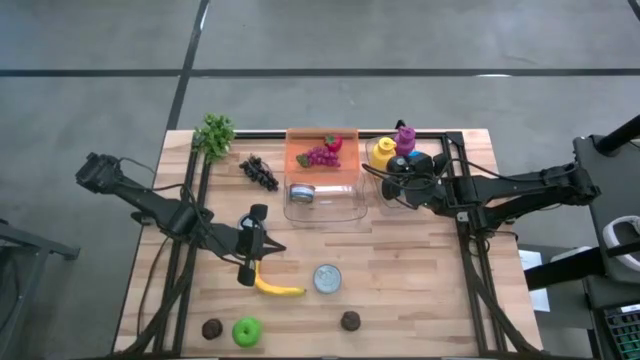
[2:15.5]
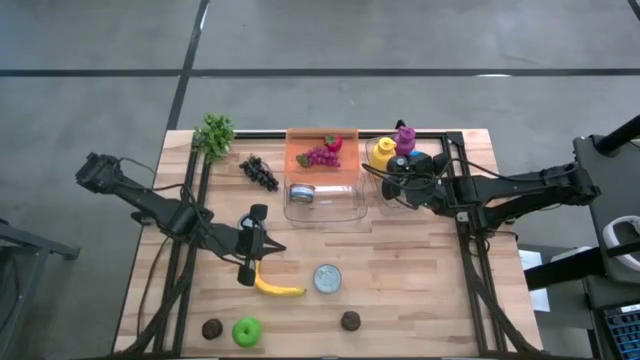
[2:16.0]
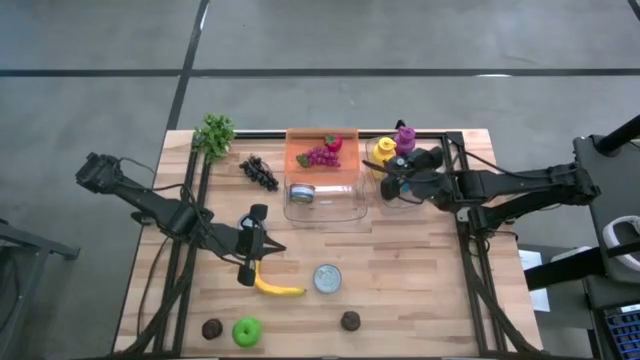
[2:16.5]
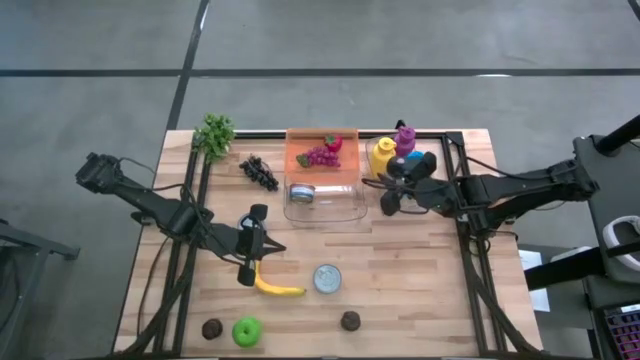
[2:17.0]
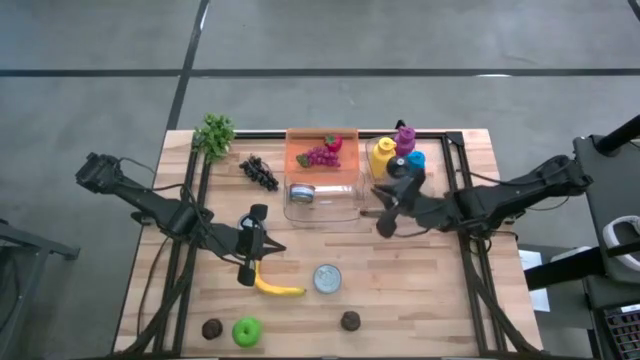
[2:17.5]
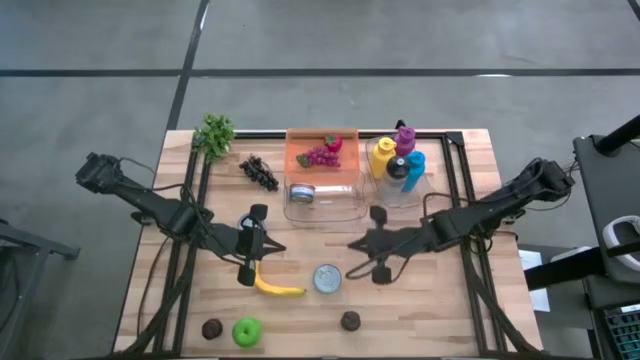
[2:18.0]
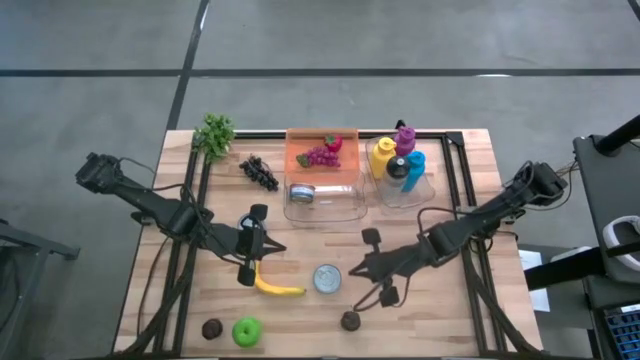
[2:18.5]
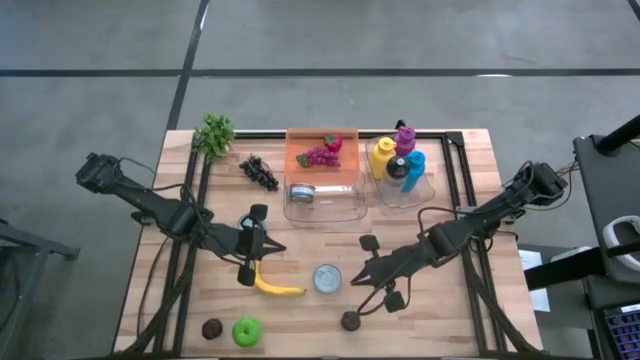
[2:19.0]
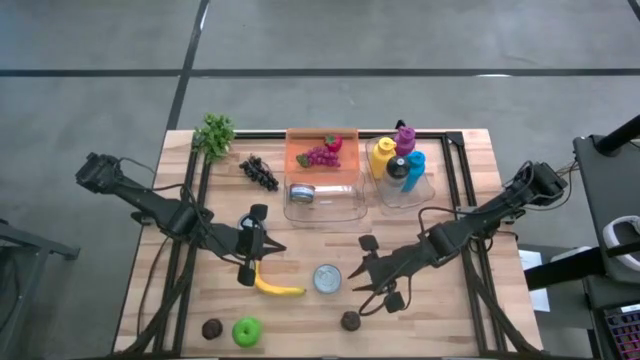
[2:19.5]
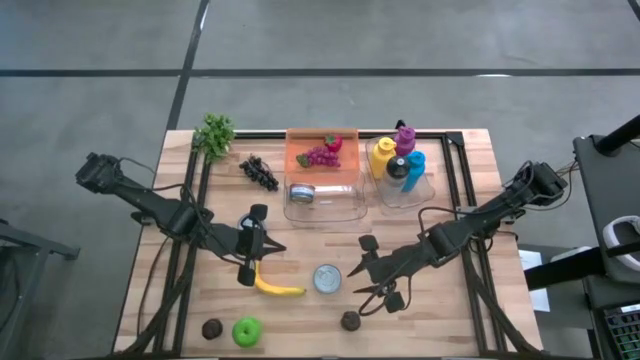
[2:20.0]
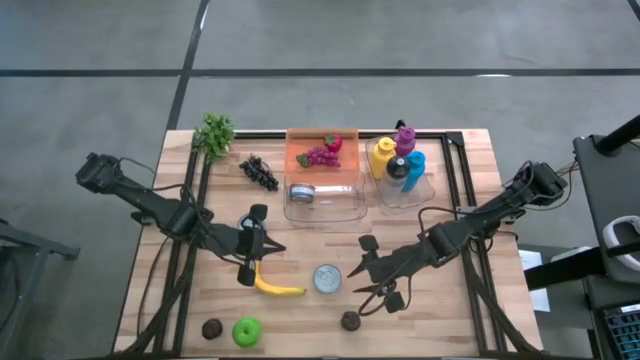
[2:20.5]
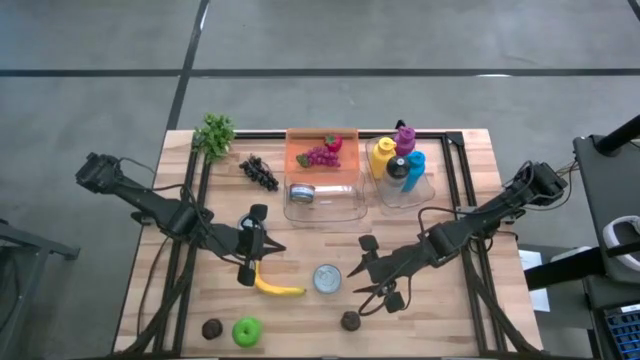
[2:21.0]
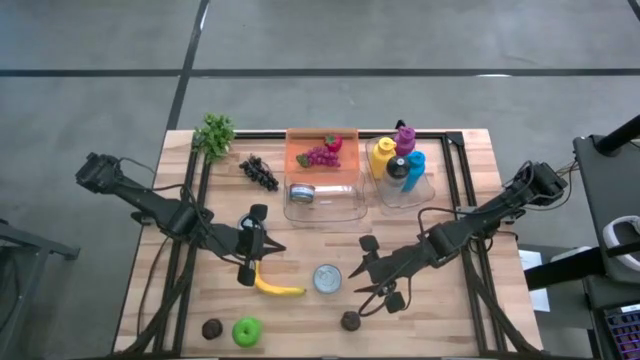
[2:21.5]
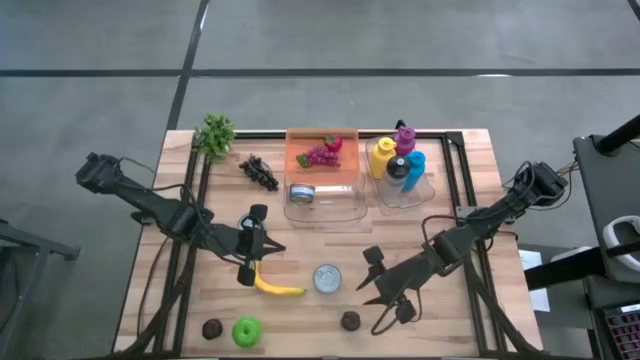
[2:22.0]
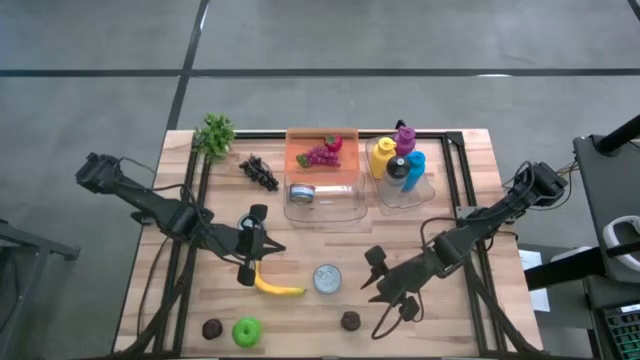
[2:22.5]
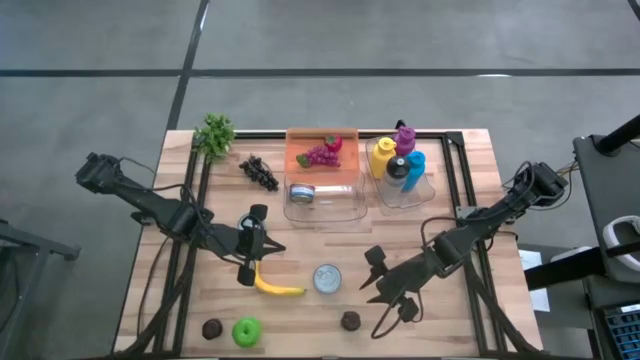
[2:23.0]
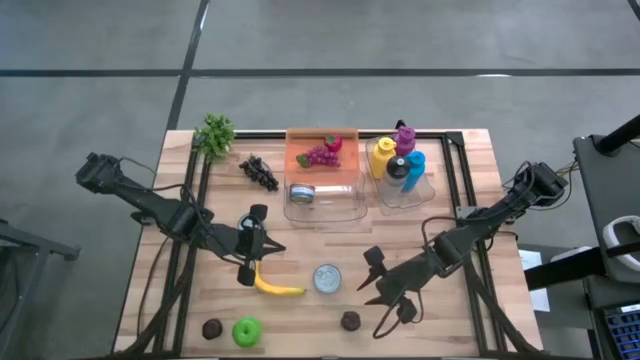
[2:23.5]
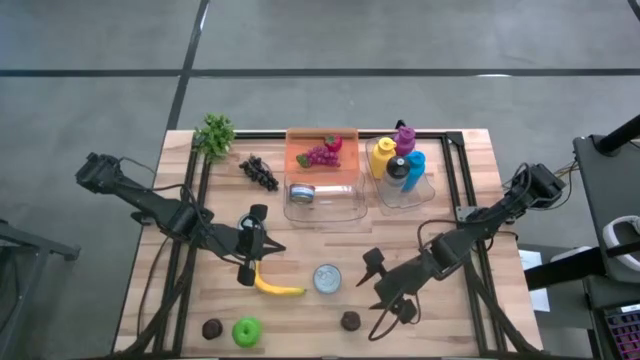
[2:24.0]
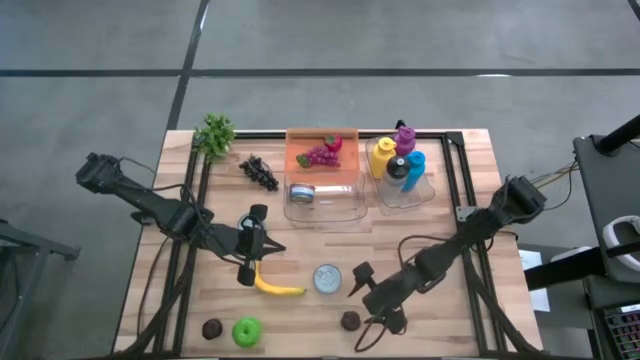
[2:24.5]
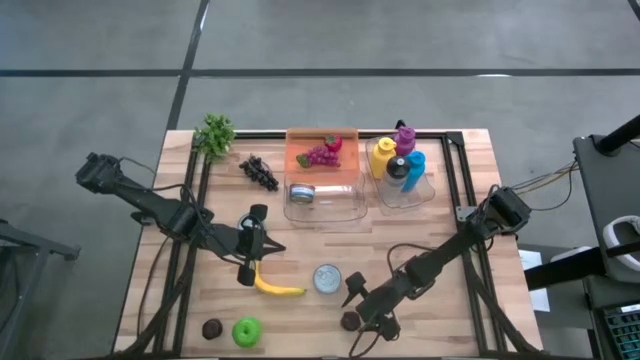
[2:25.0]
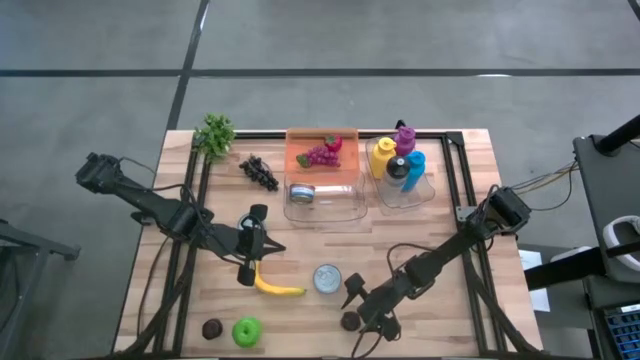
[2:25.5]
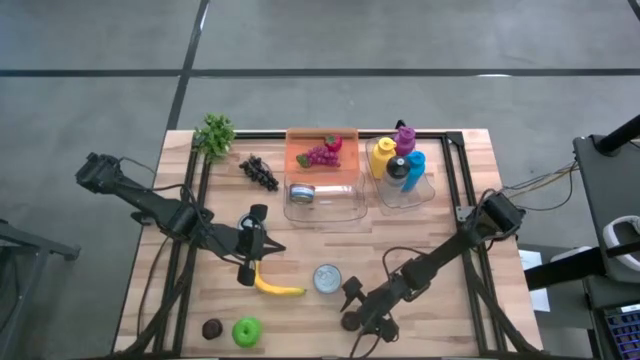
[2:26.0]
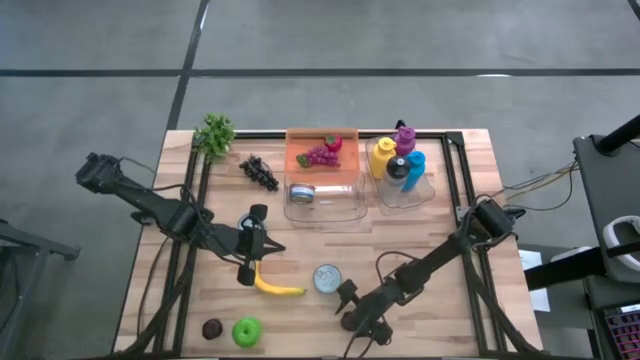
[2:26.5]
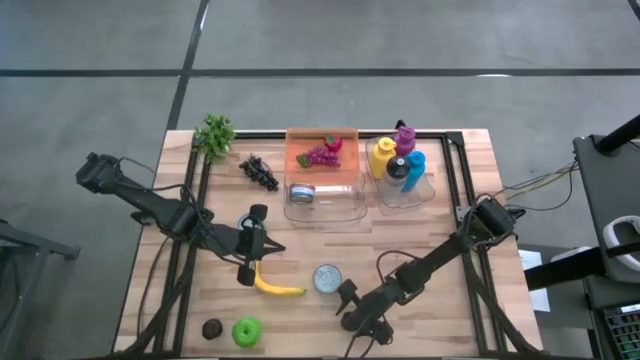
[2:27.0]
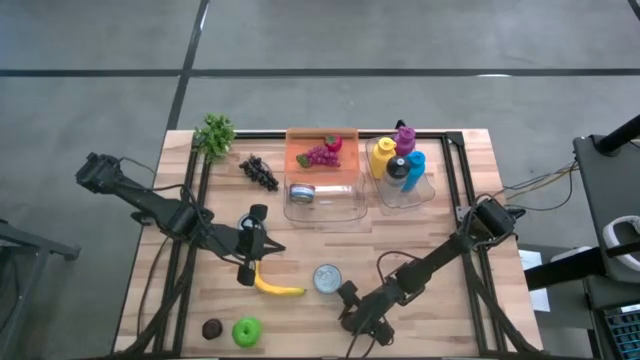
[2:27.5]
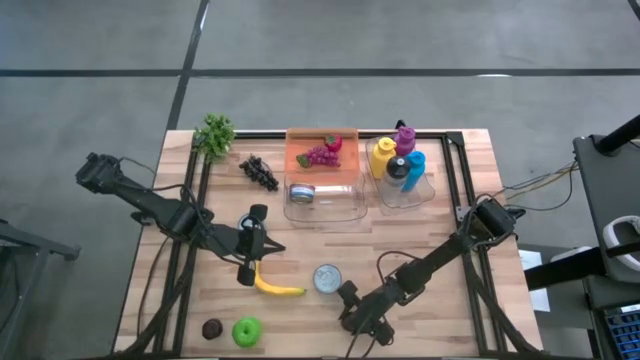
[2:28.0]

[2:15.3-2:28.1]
Task: Pick & Place Food Item
Put the right plum into the orange bin

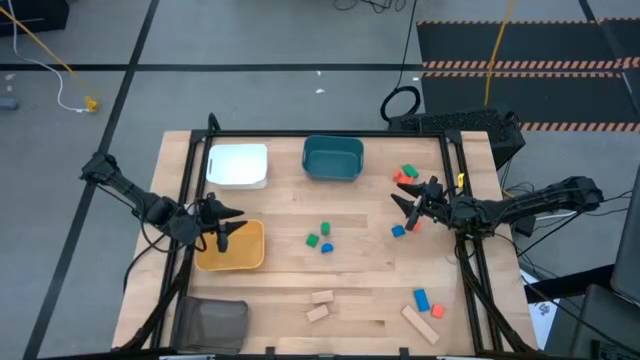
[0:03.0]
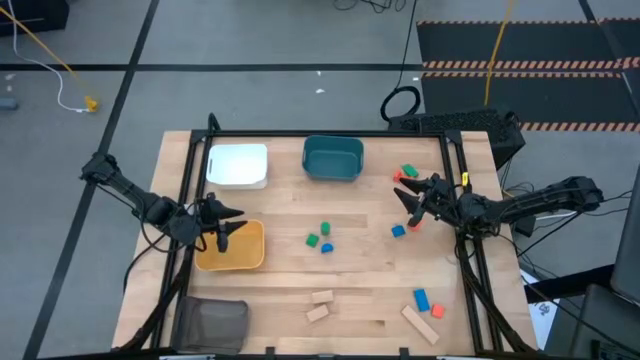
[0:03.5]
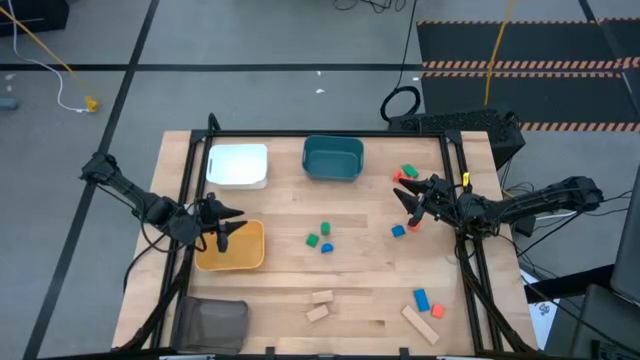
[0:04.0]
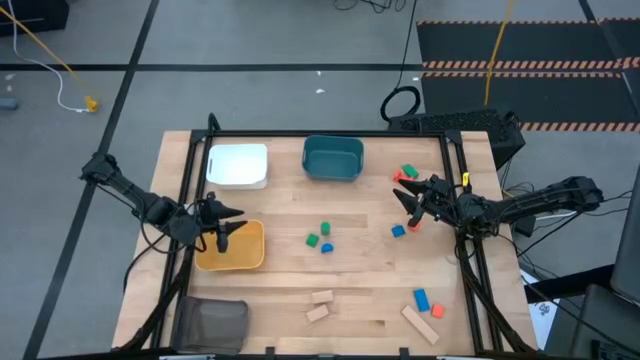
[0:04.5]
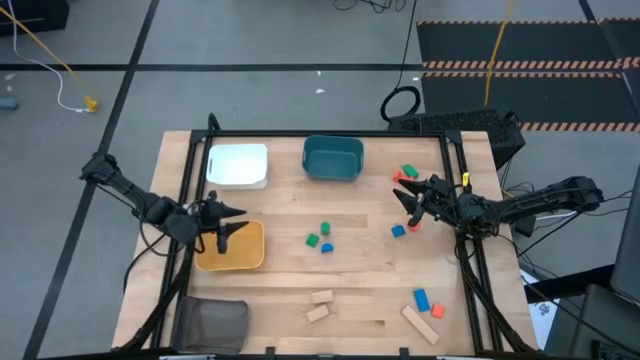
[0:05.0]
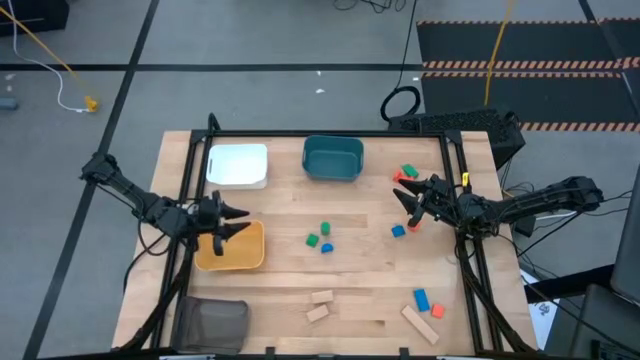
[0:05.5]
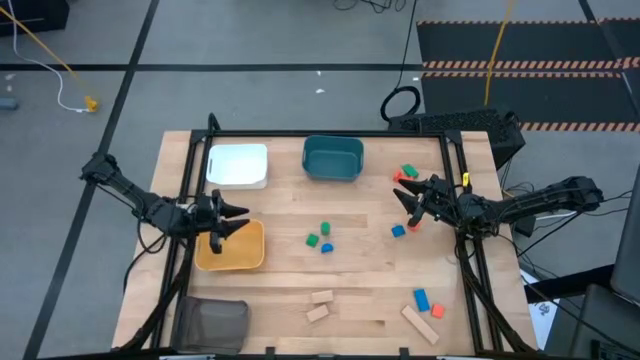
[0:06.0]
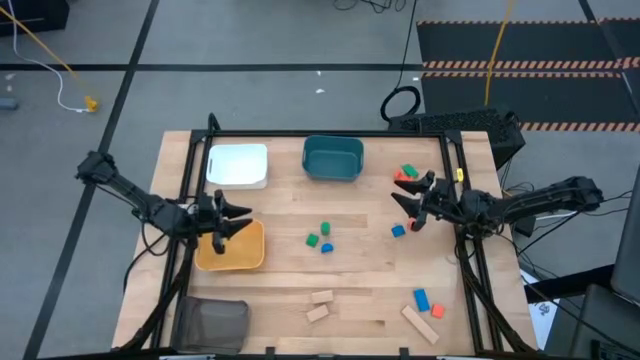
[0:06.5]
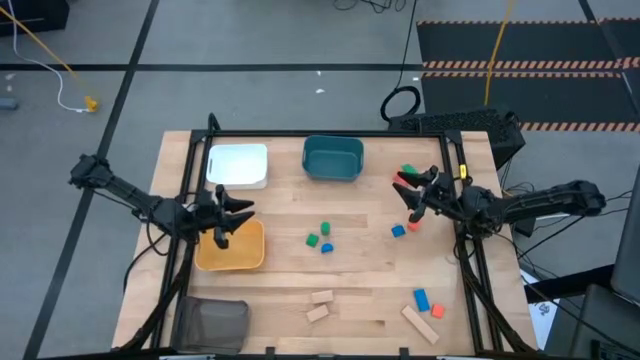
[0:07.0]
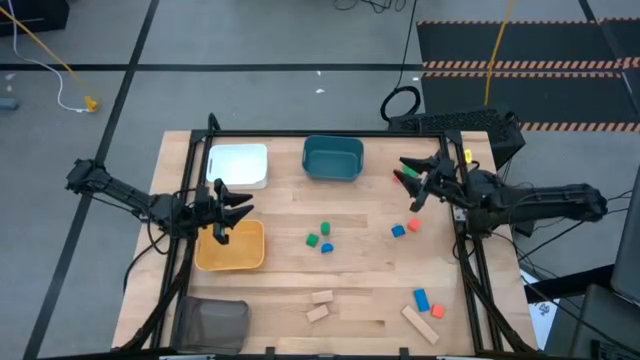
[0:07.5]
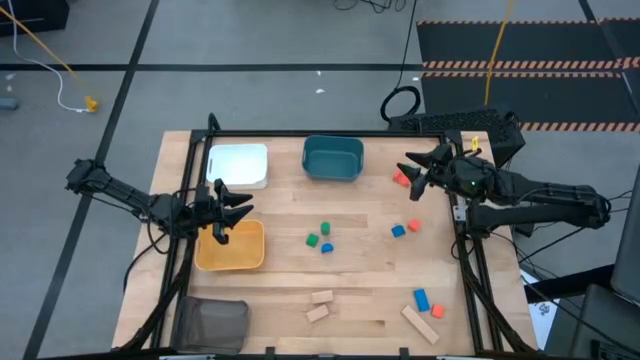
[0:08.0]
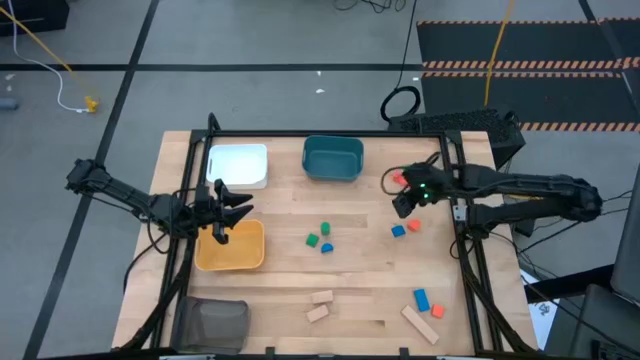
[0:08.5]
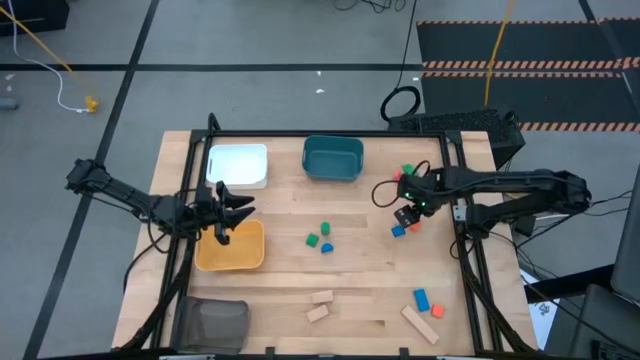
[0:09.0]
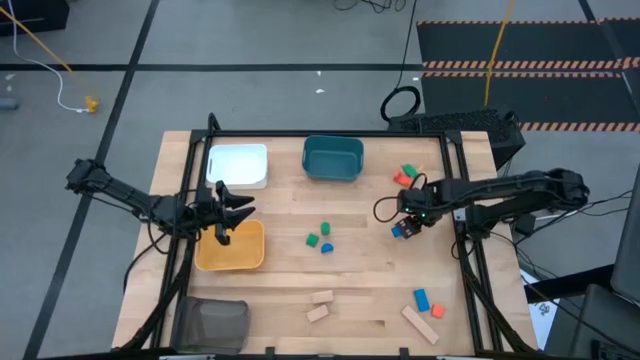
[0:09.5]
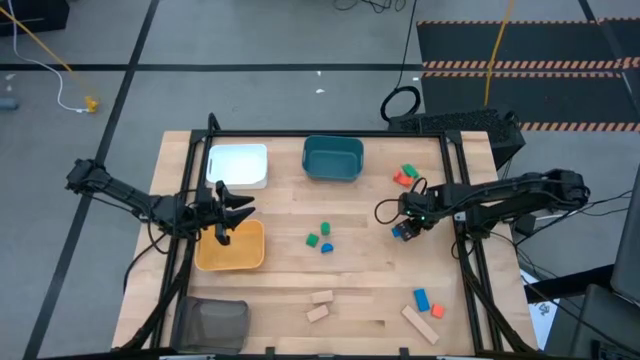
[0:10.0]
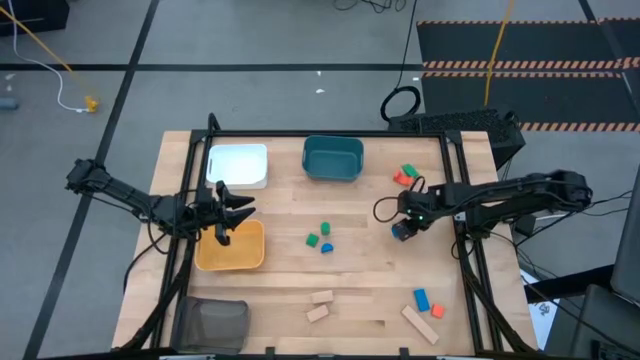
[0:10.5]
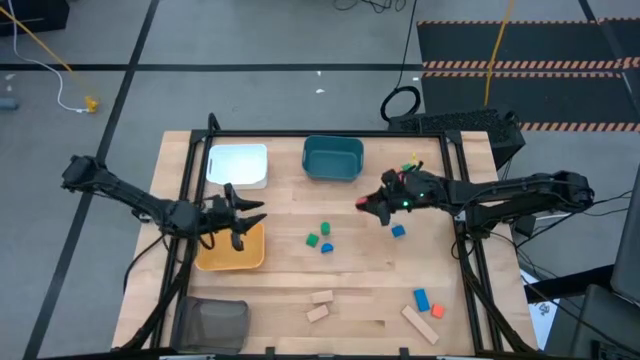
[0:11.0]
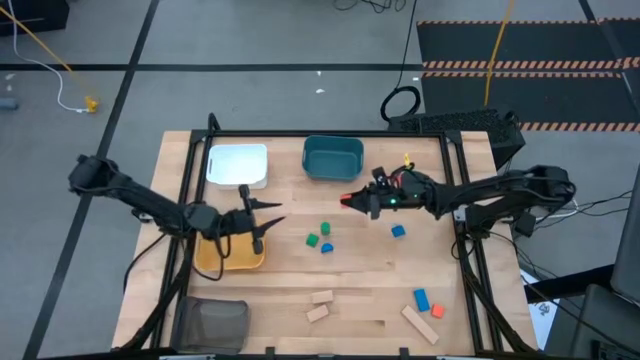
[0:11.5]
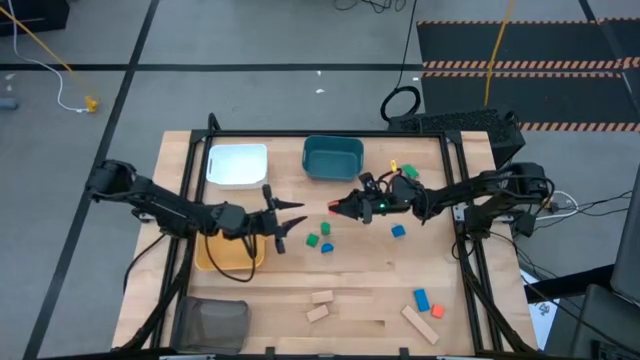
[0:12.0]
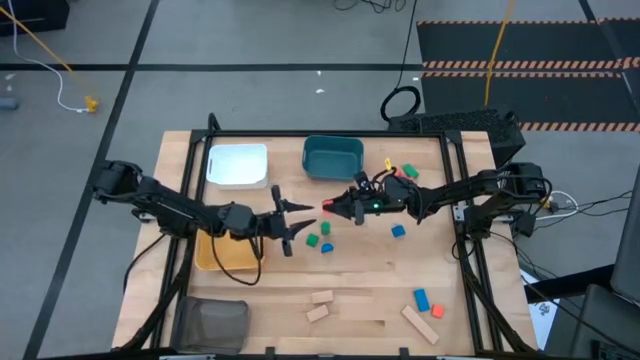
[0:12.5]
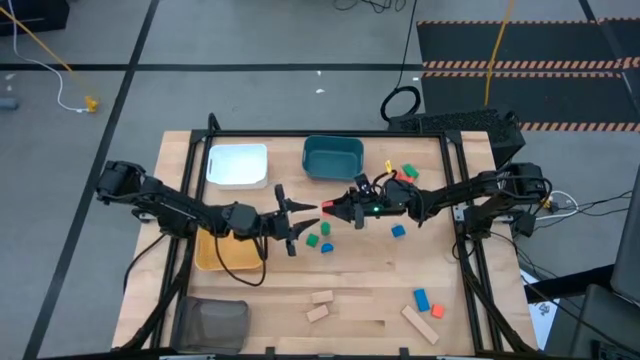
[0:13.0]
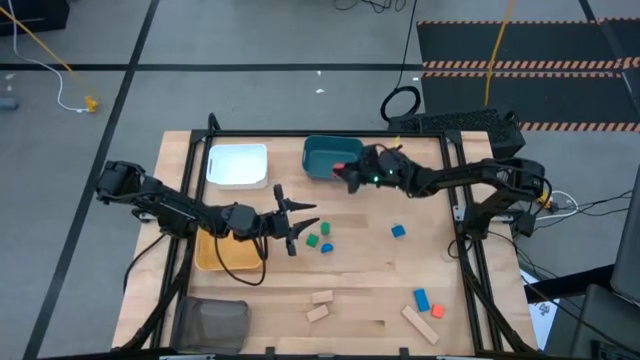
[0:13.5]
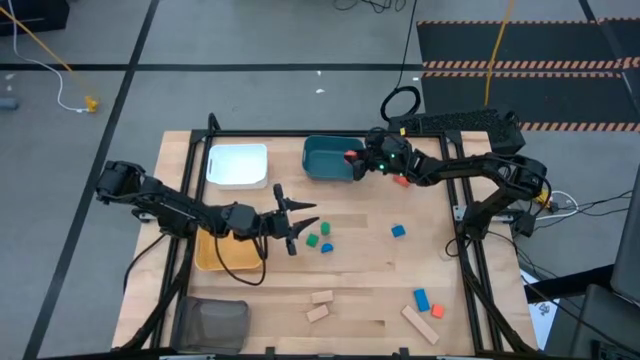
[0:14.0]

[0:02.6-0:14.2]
Task: Sort & place blocks by color
Put the middle orange wooden block into the blue bin
